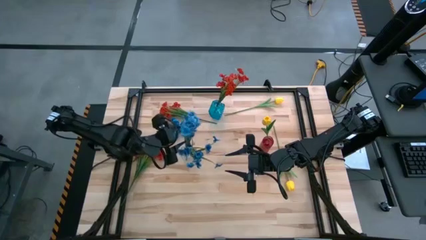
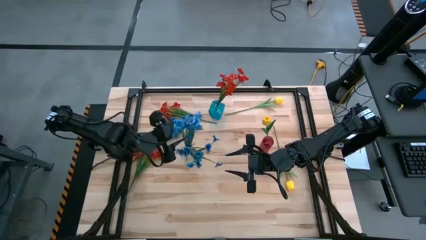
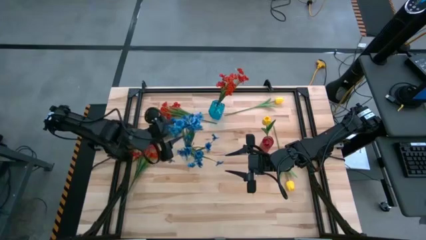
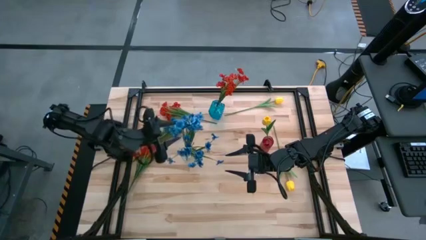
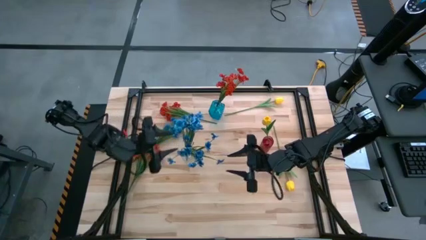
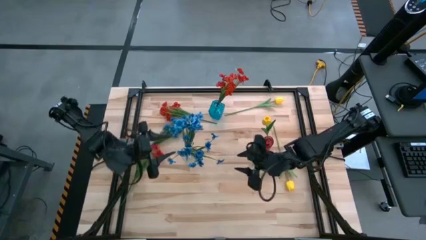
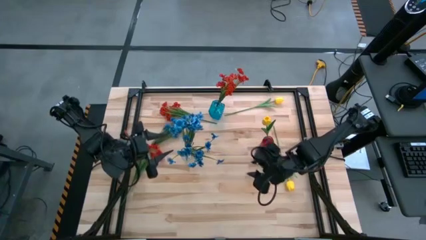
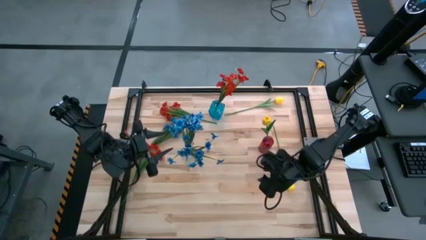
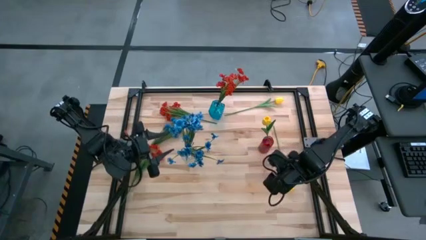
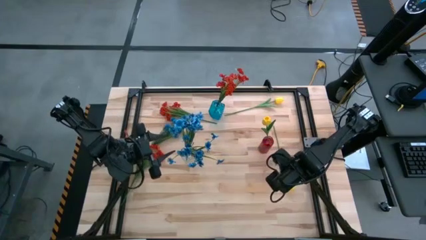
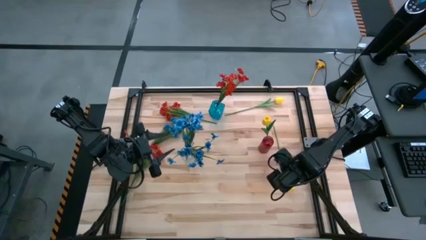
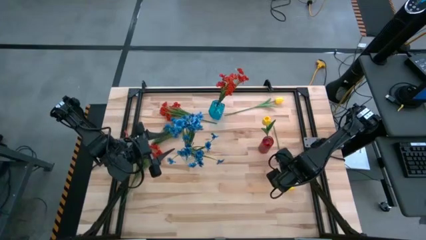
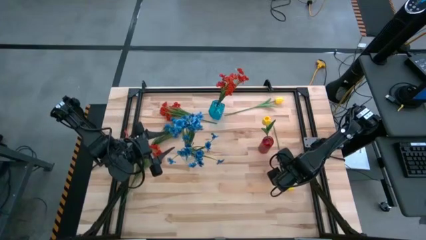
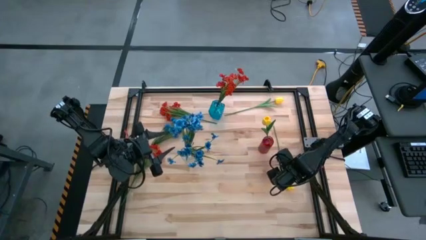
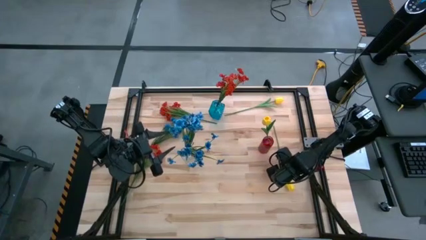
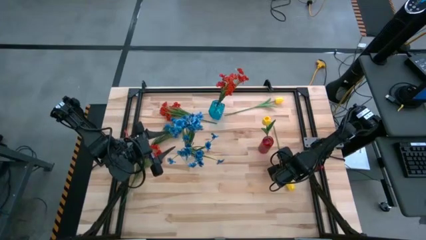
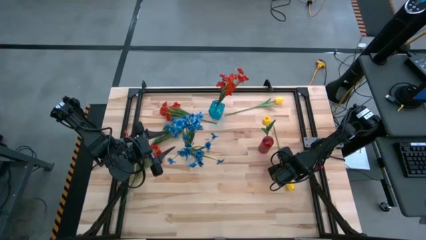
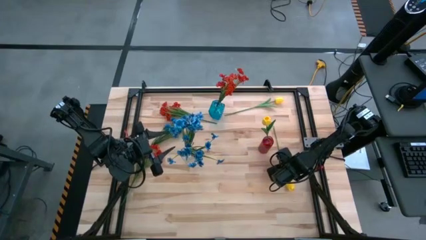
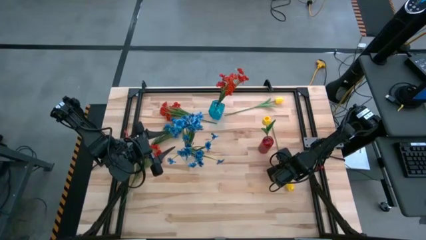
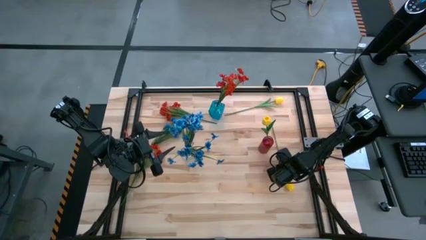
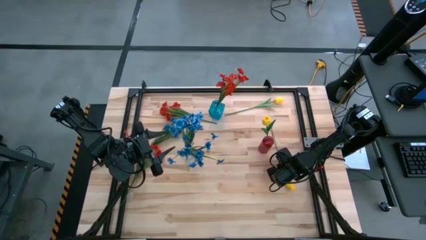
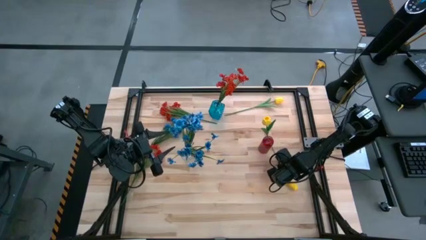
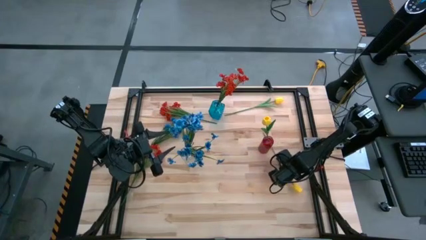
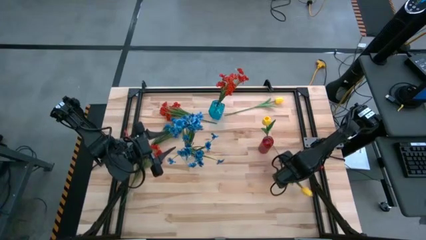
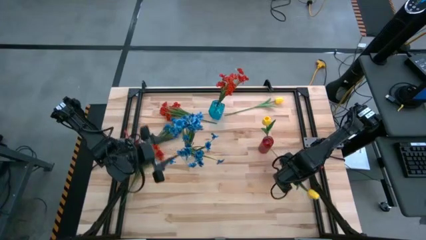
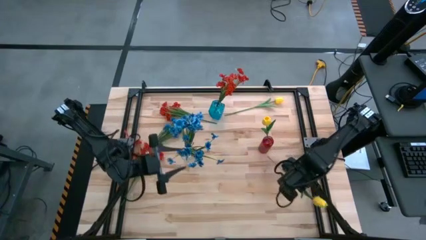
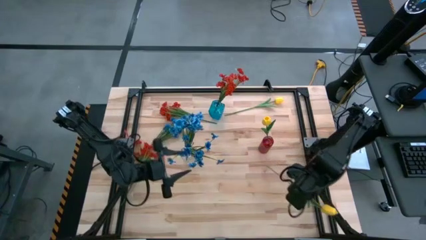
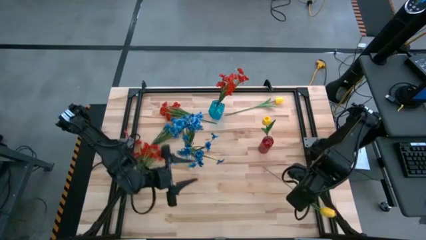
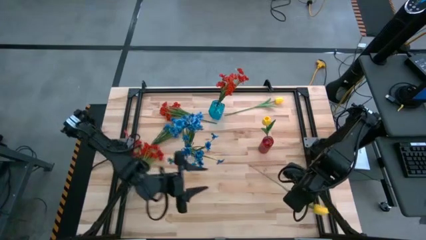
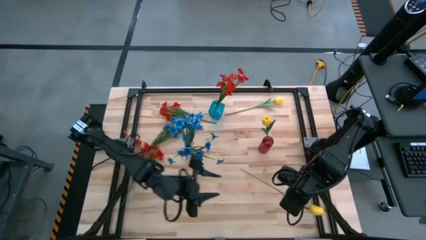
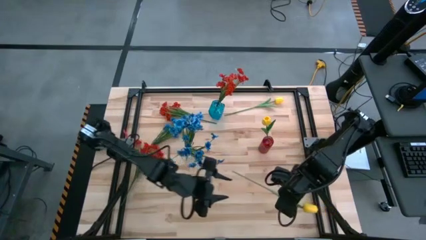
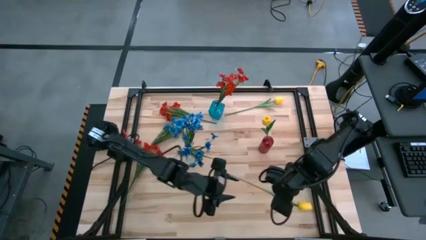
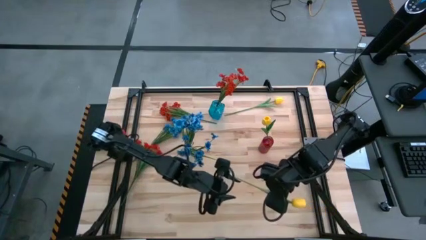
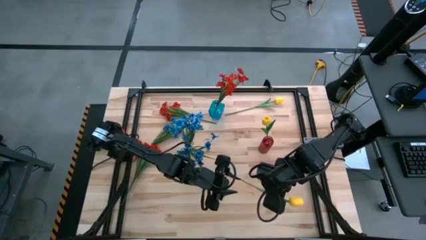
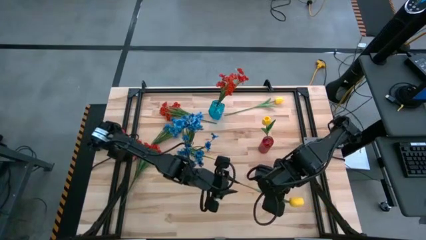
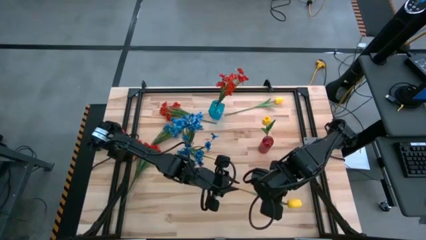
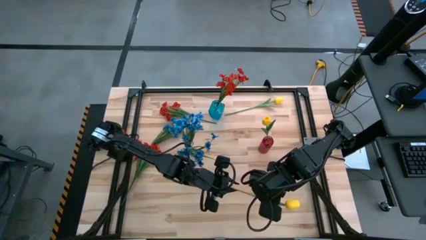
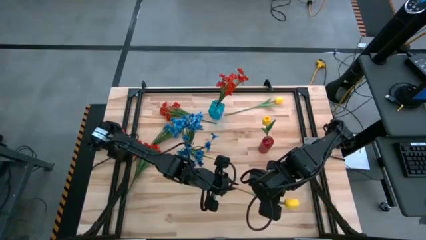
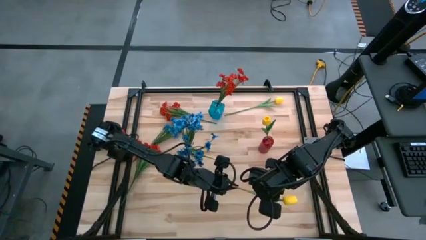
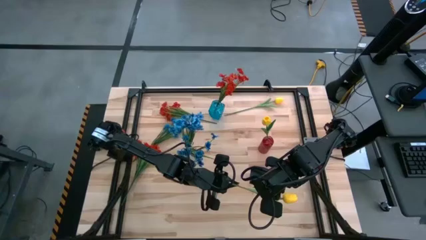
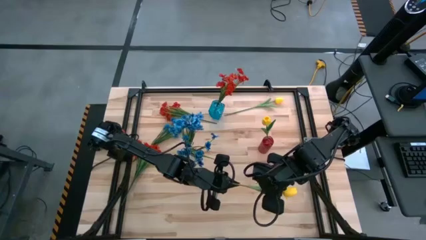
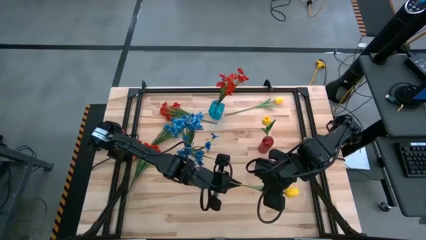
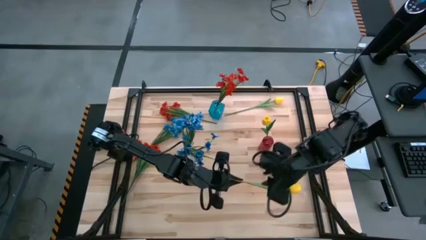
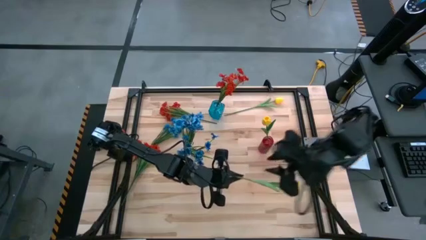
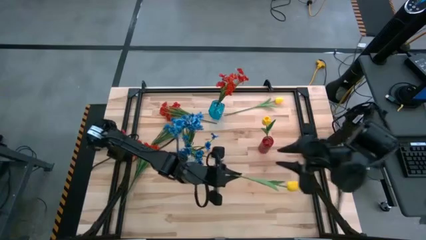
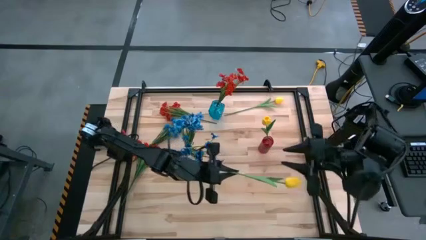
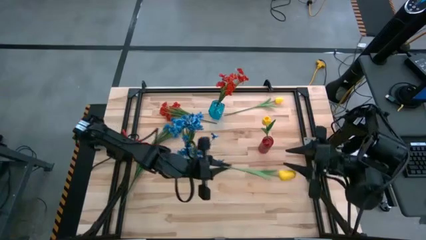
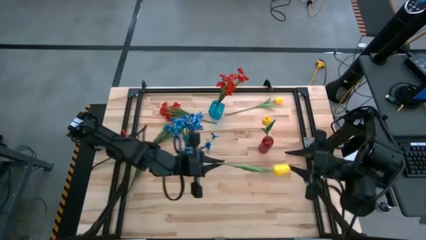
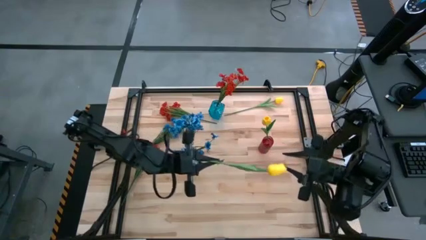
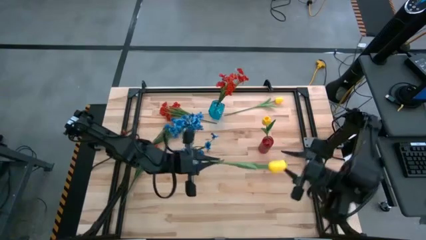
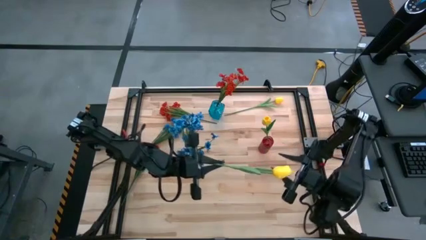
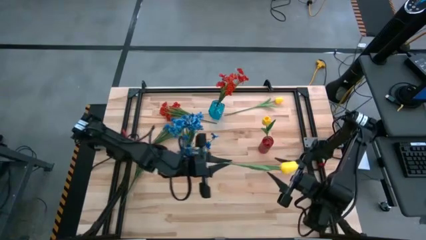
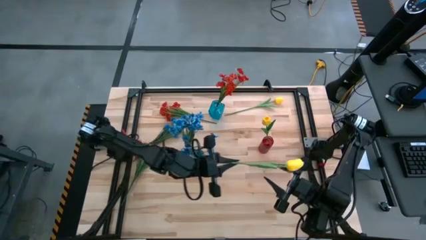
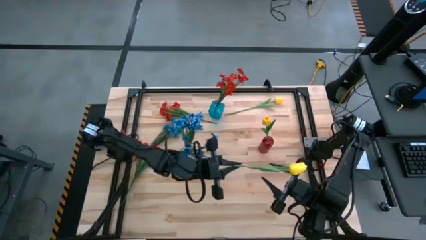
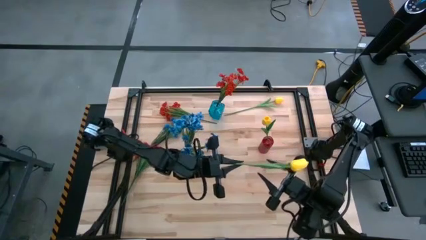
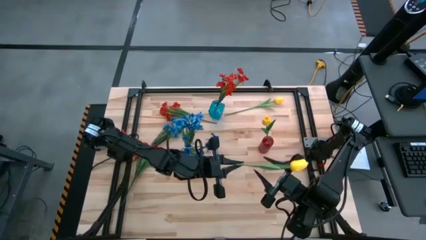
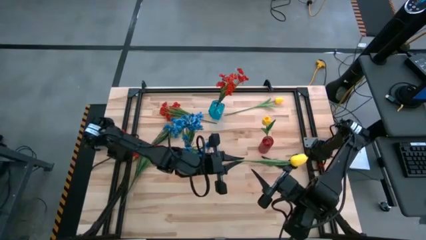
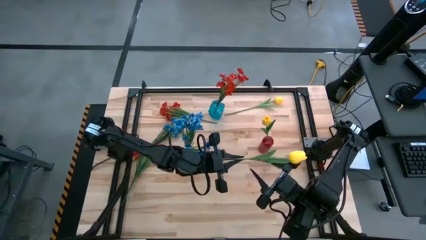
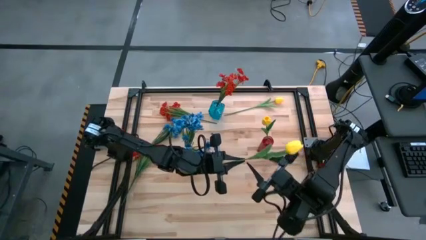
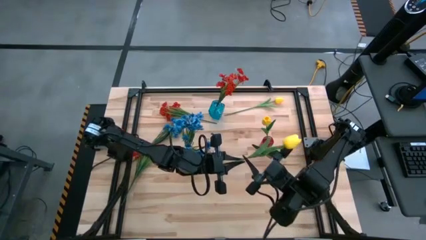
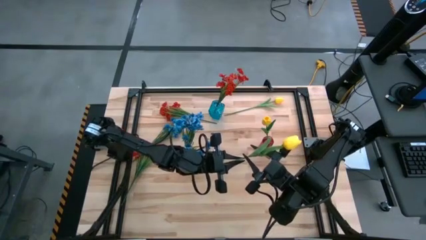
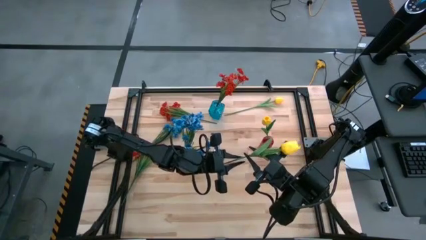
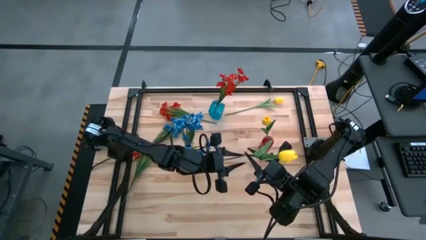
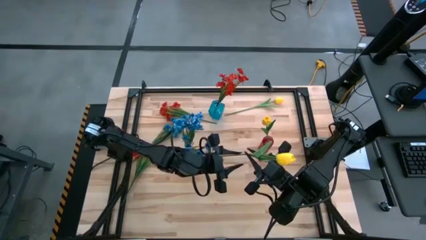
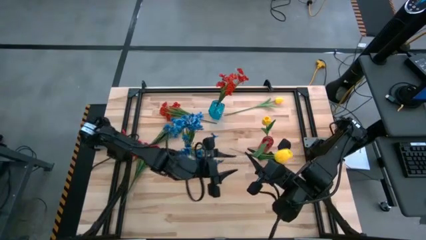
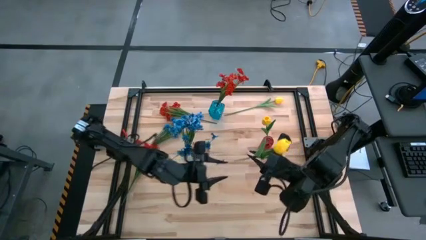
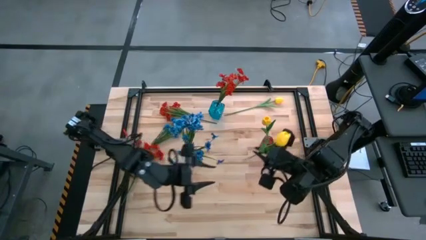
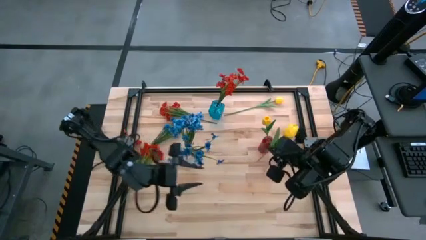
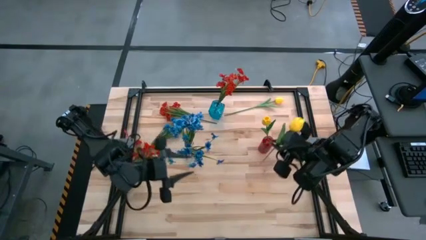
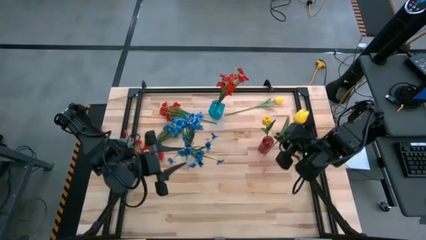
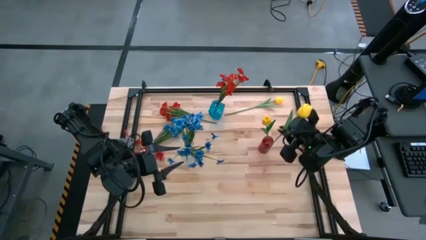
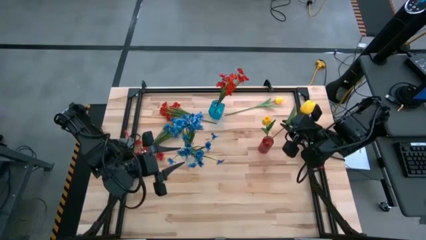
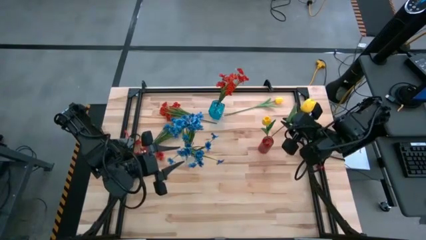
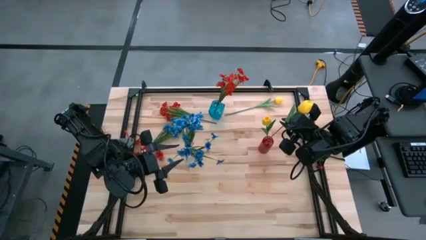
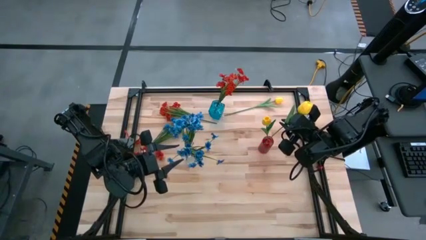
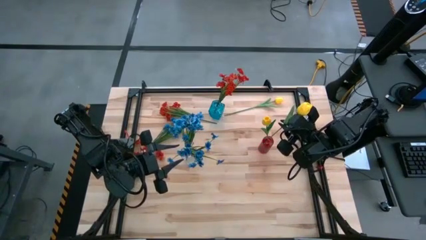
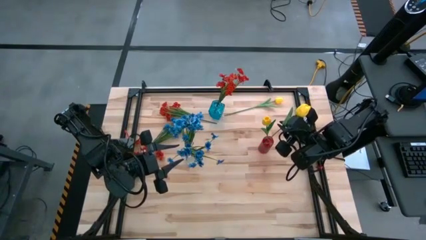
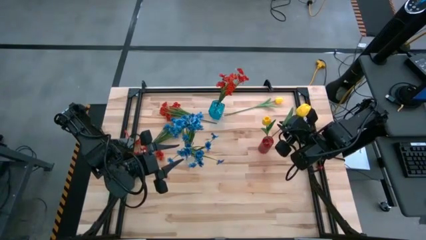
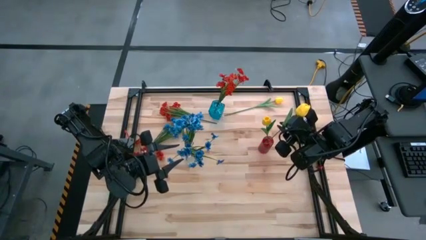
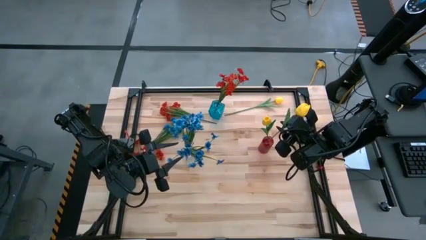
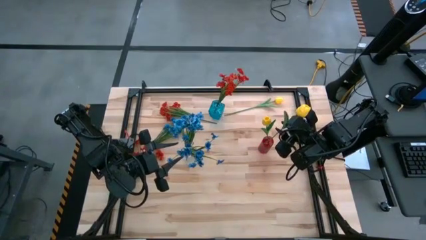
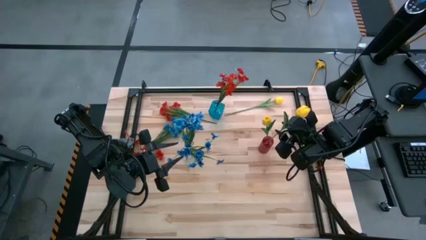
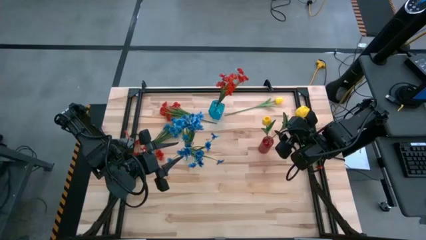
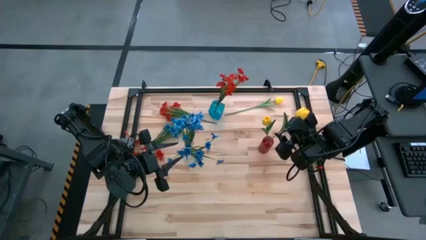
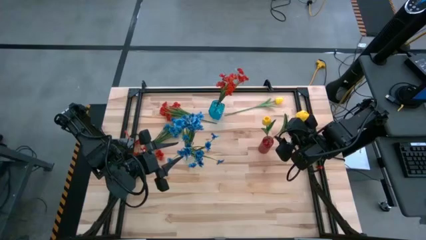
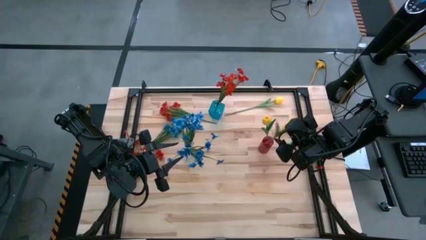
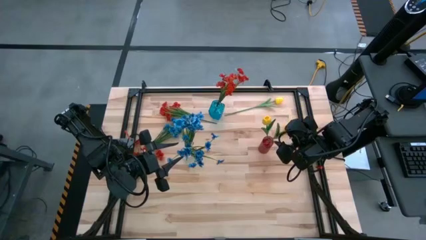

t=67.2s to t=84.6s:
Task: Sort flowers into vase by color
Put the bottom yellow flower into the red vase
